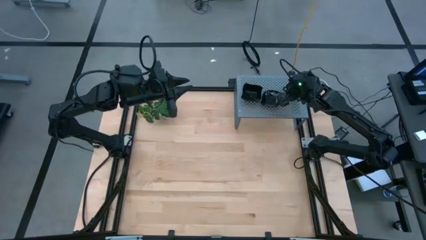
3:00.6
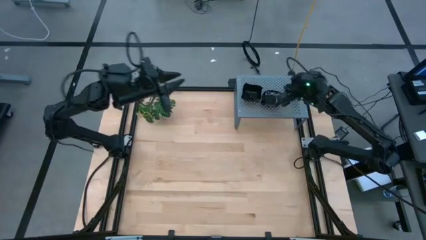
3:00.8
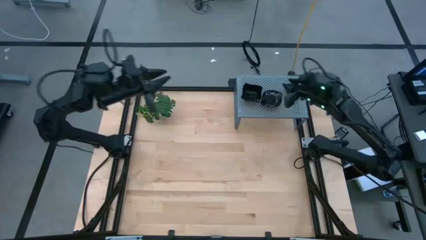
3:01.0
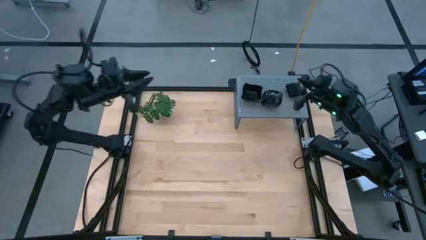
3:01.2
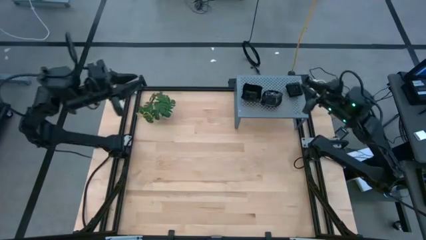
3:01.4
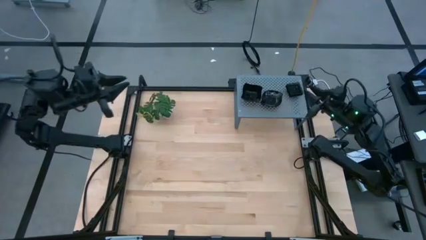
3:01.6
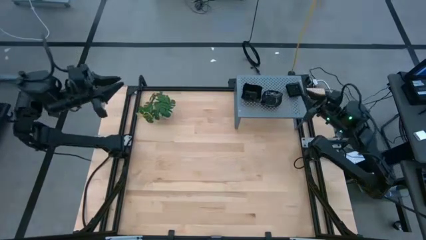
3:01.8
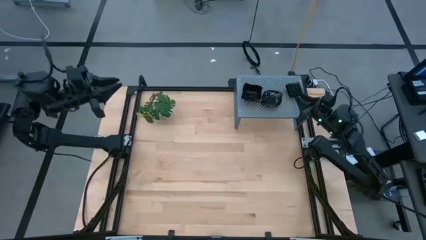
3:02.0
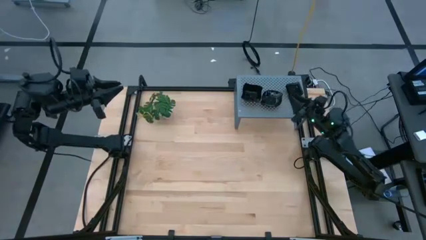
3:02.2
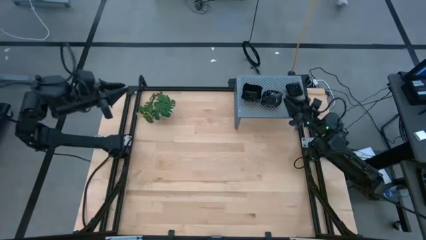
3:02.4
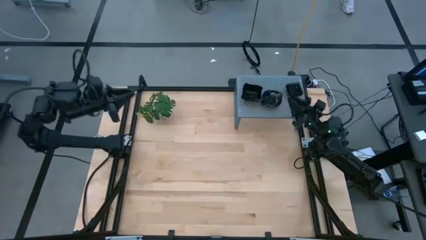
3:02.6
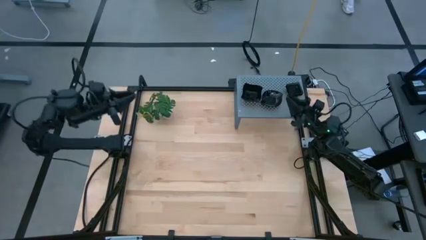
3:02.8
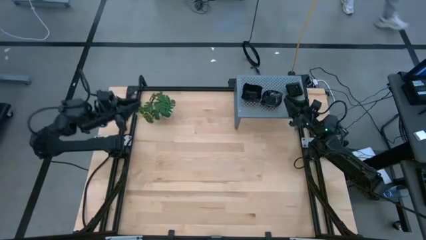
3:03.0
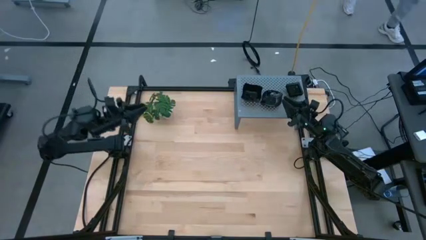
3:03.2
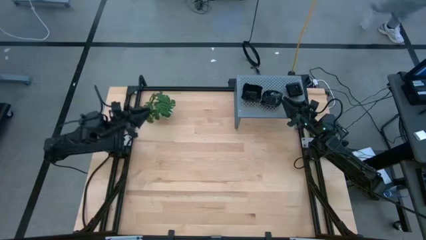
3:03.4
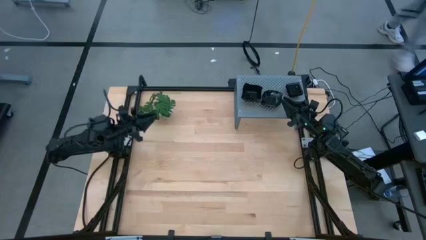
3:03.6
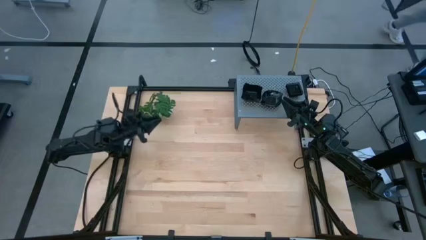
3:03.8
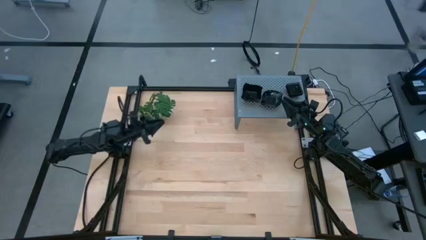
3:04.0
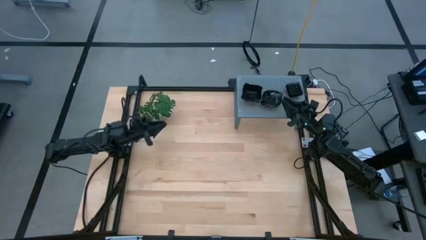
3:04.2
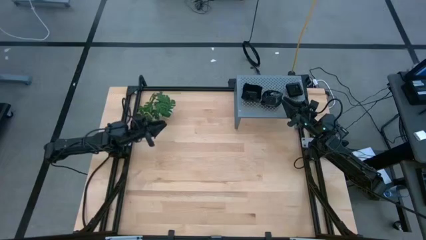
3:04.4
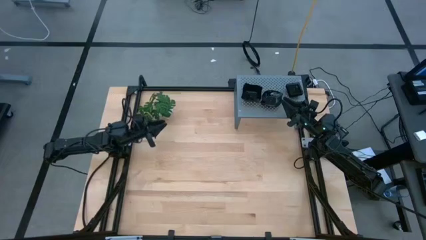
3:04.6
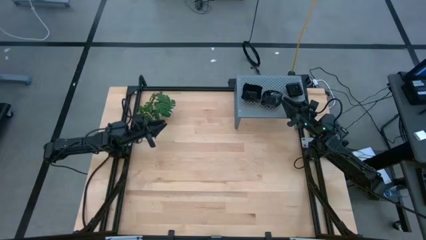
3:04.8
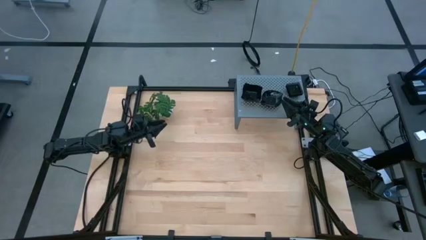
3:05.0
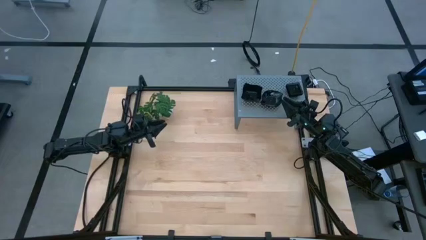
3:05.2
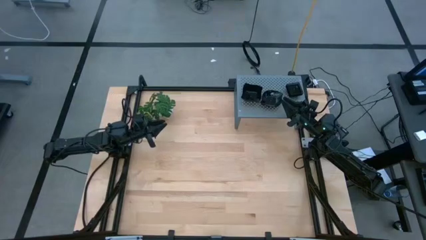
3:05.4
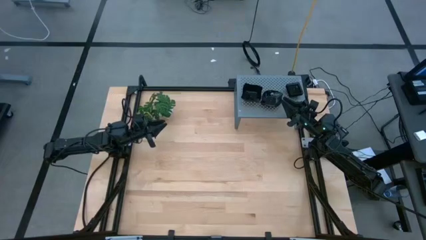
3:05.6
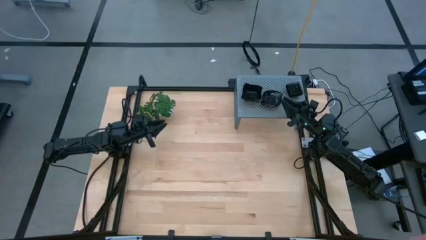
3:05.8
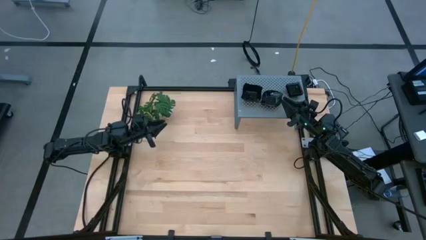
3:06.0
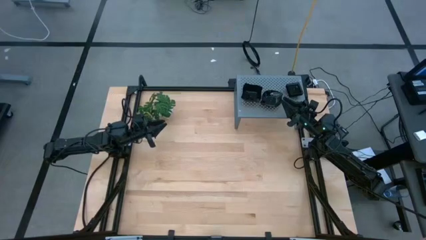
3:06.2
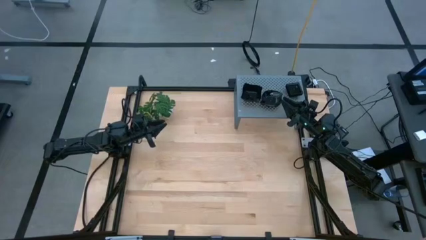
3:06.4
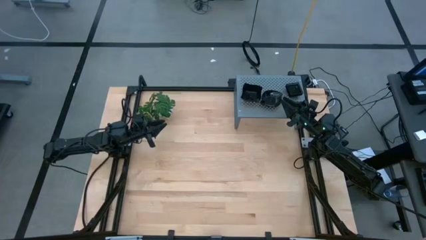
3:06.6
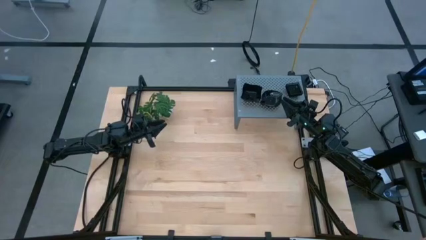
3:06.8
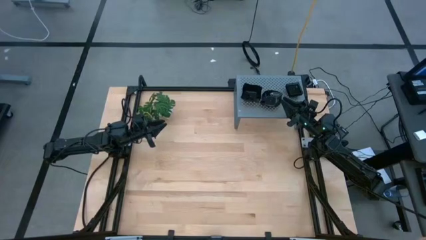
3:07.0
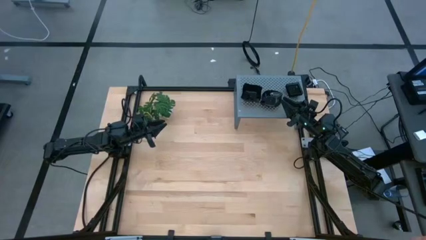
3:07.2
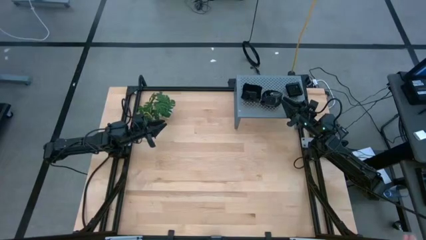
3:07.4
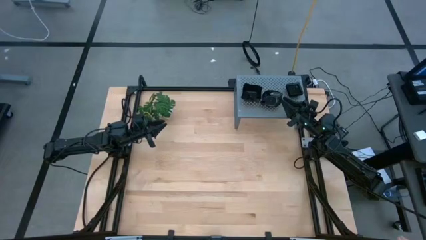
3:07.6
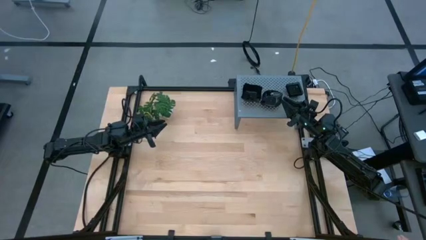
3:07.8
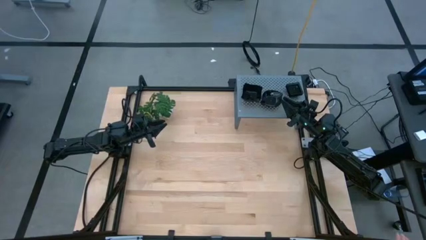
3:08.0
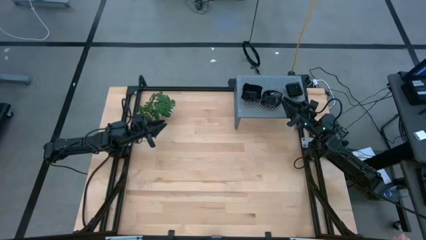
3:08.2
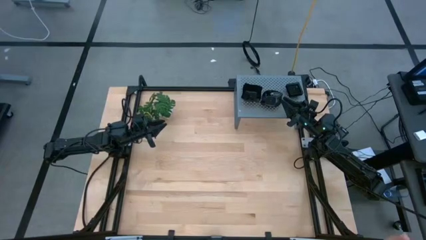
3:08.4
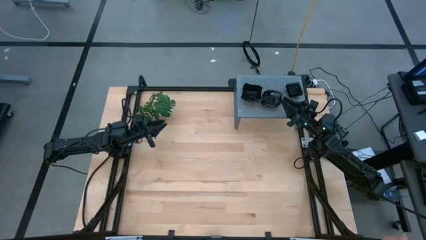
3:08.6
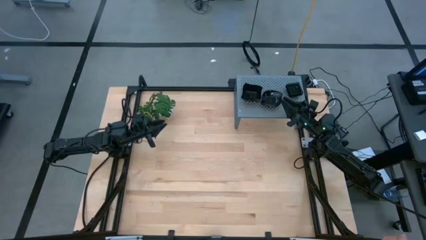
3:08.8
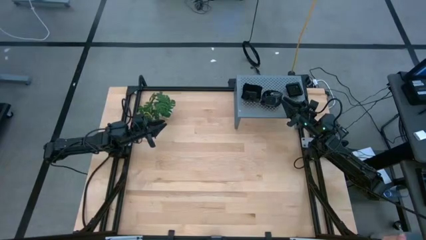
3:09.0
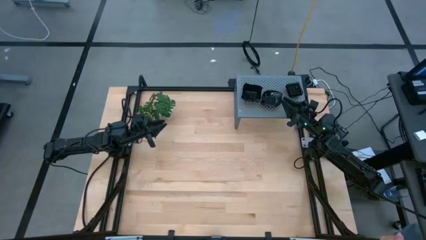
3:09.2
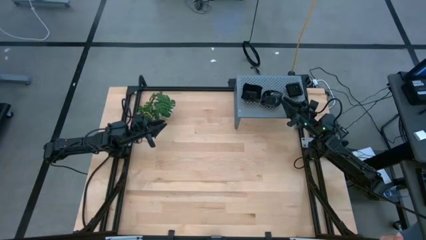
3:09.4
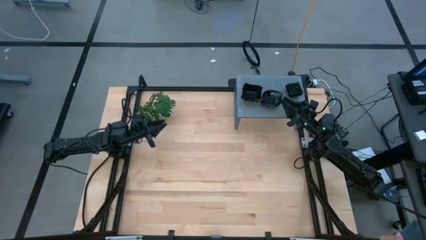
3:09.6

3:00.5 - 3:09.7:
Task: Pick & Place Mini shaped plates
Return to Home Position

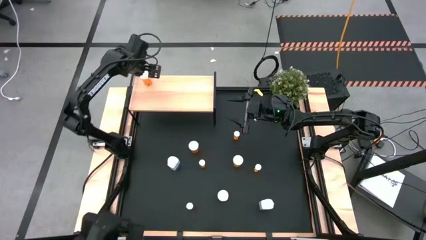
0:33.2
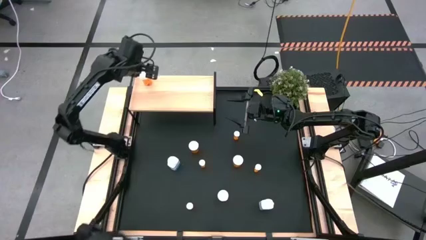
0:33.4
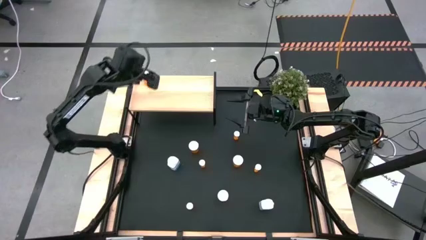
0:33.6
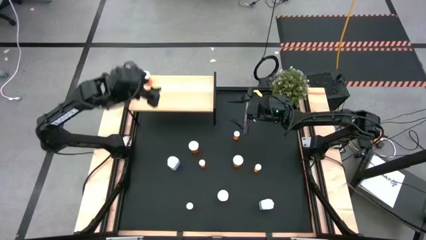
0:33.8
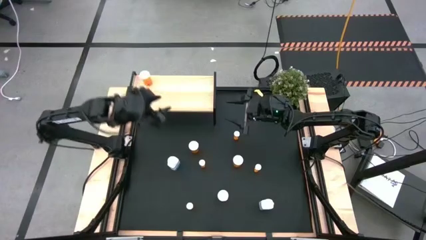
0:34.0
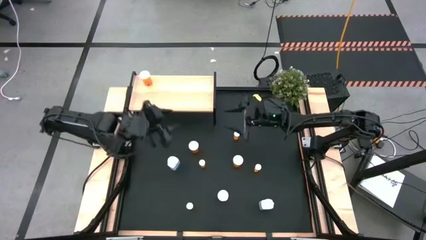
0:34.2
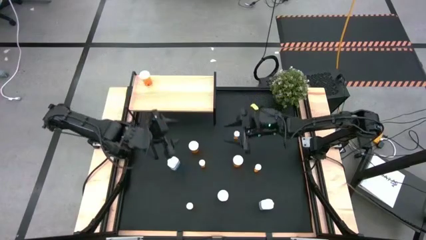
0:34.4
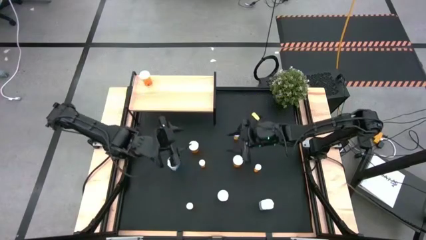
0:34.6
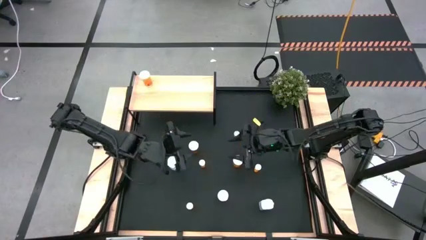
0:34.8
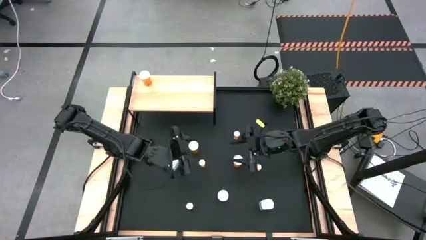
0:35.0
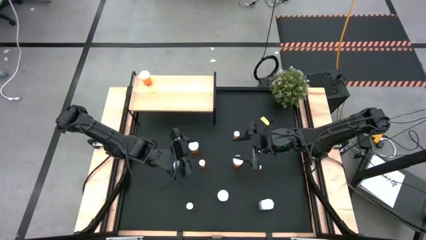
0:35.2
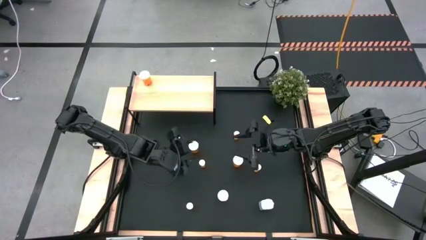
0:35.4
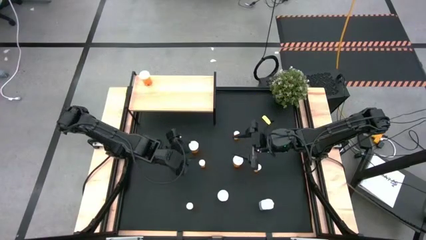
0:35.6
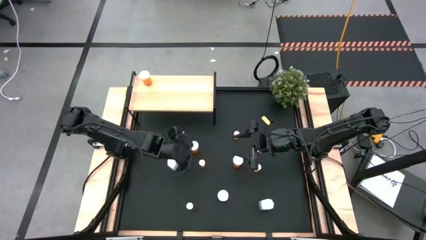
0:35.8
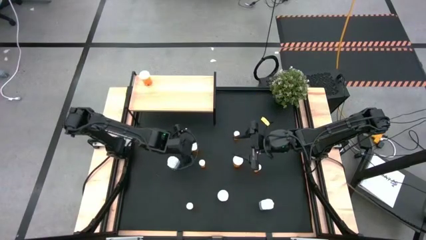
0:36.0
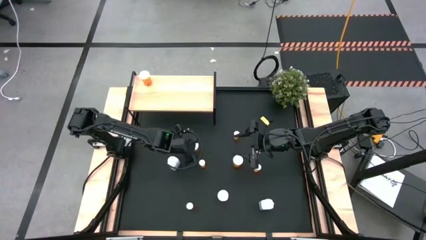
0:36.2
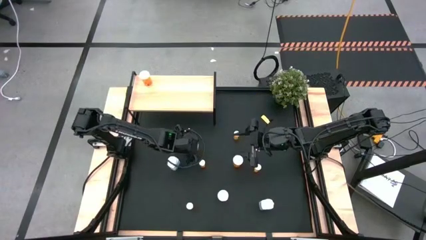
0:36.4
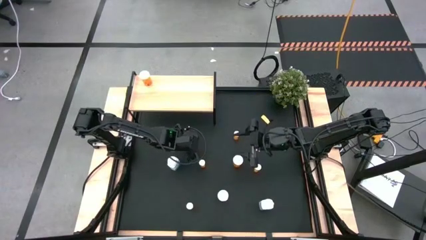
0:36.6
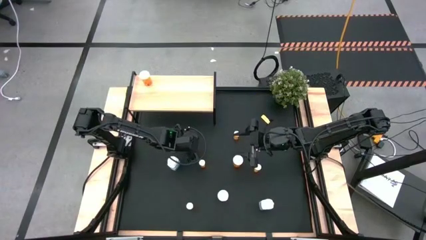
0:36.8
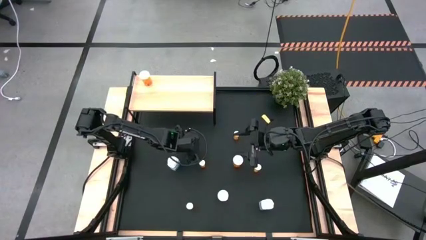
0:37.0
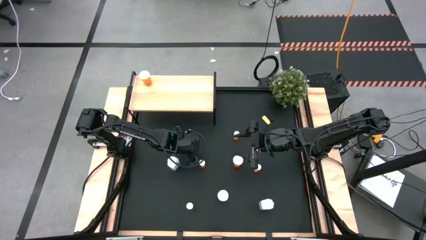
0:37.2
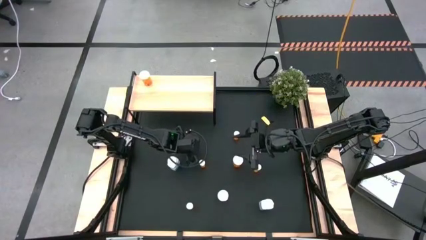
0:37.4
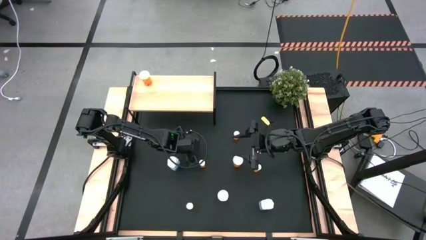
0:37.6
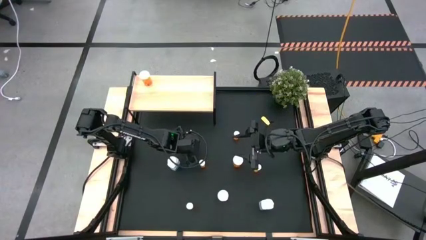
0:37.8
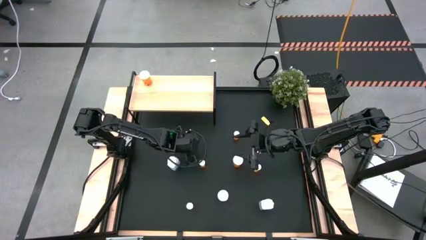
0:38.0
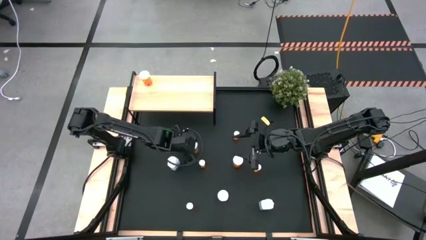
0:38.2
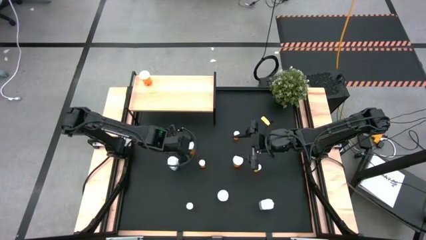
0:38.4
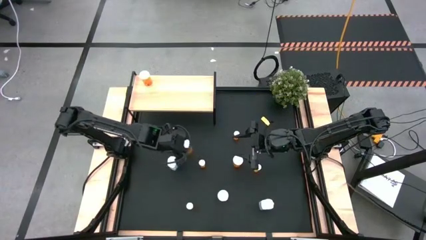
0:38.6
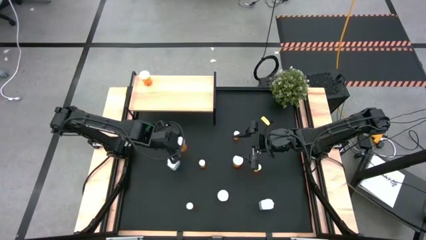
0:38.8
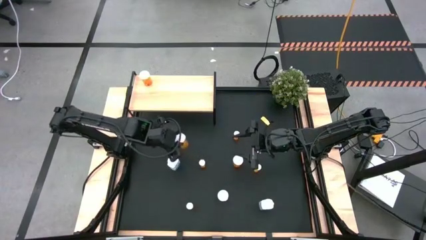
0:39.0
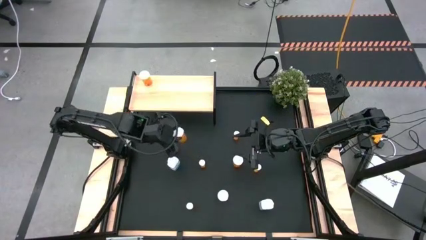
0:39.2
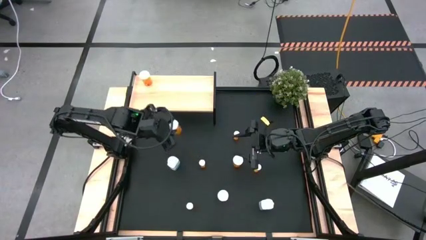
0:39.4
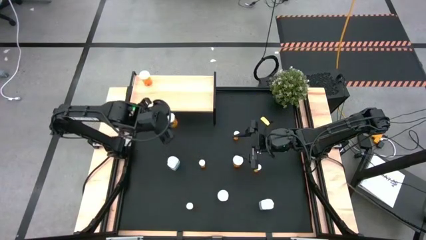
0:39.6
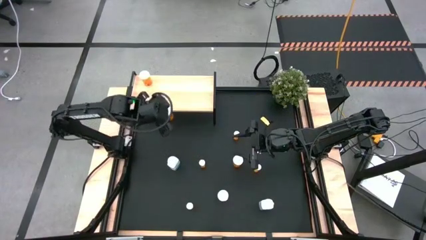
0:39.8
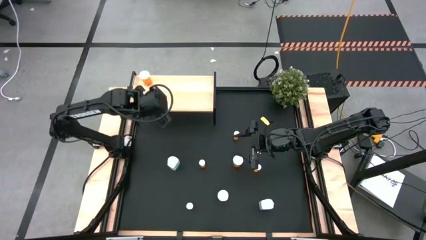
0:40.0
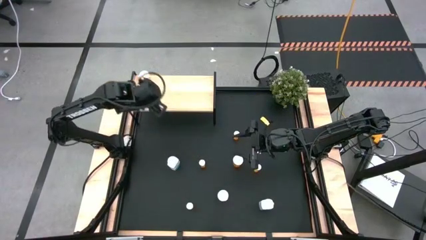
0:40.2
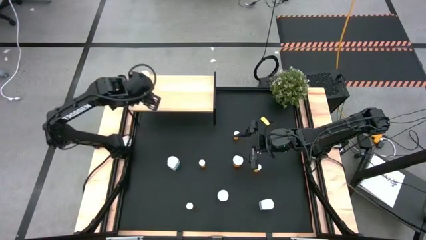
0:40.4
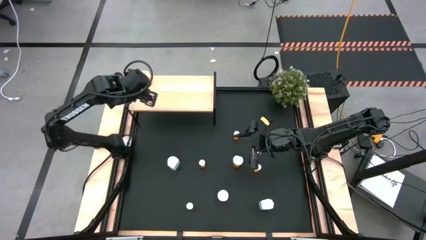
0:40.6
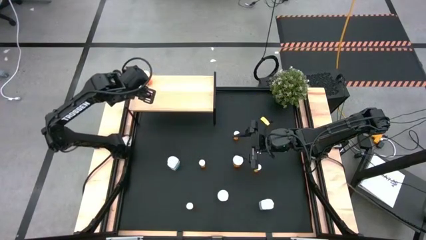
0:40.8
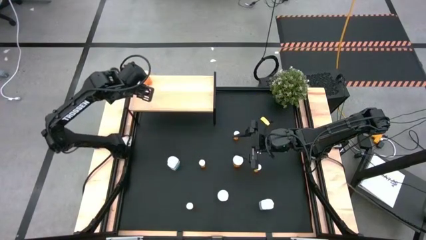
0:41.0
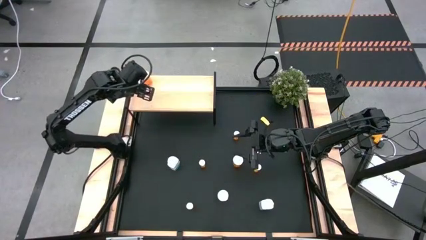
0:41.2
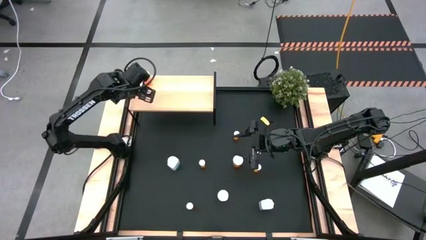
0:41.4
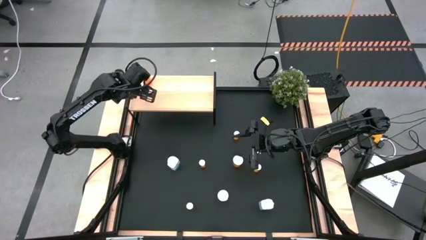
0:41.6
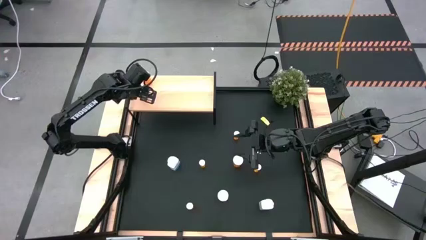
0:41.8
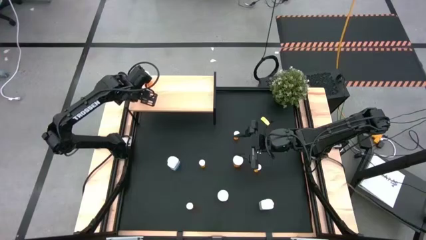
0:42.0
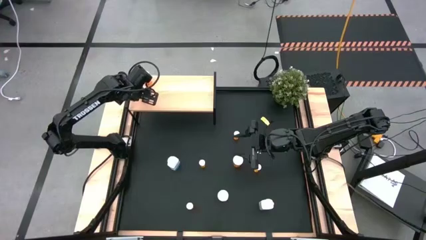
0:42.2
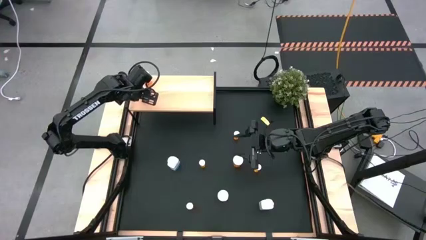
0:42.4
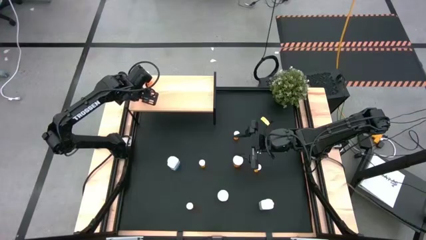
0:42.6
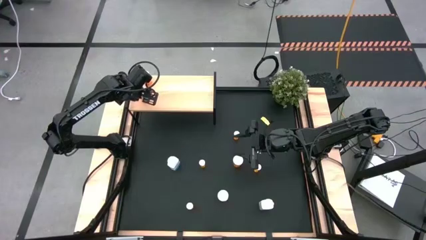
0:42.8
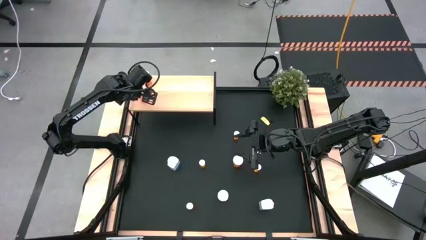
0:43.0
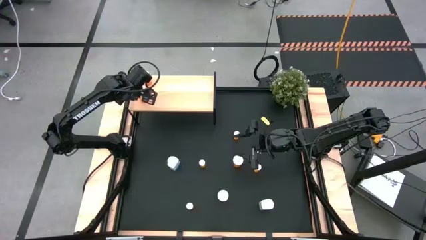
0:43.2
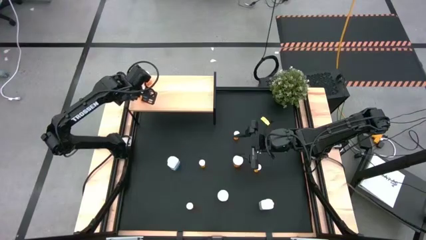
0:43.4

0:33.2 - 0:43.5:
Task: Pick and place medicine bottles onto shelf by color
Put the large orange pill bottle on the shelf aligned with the other large orange pill bottle
